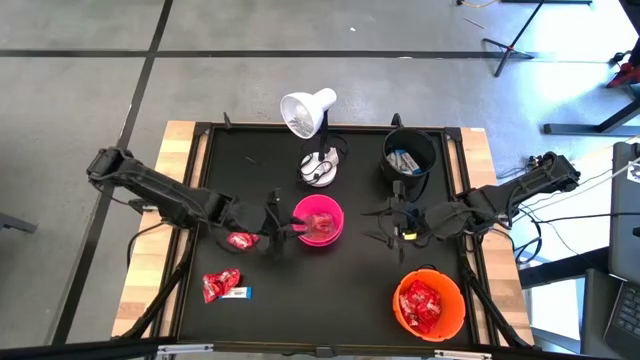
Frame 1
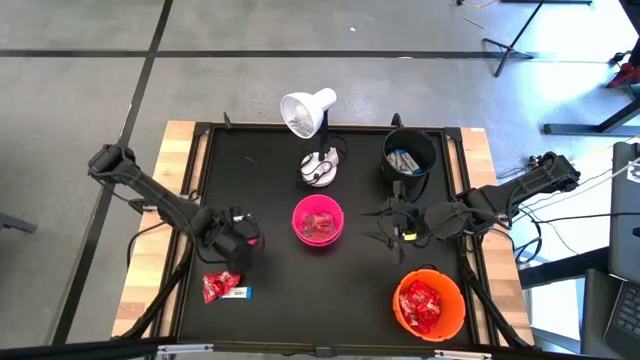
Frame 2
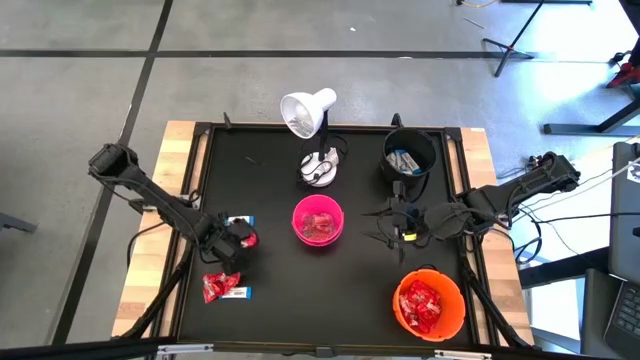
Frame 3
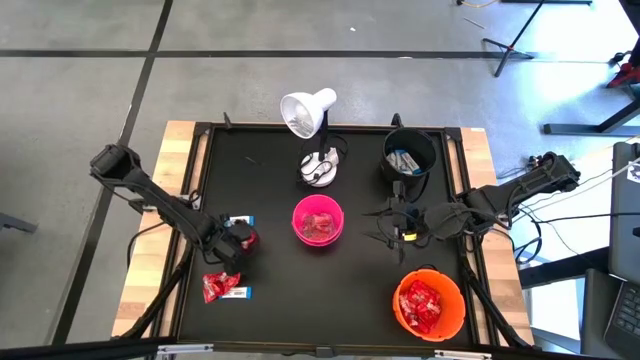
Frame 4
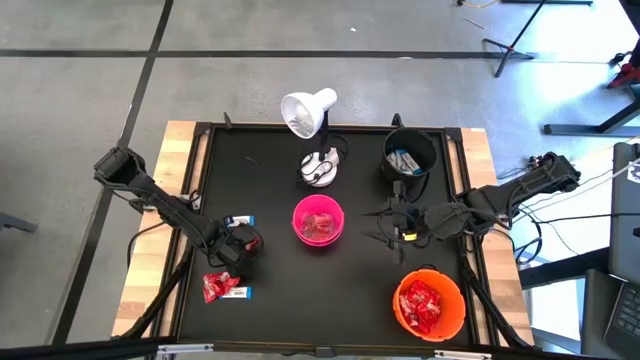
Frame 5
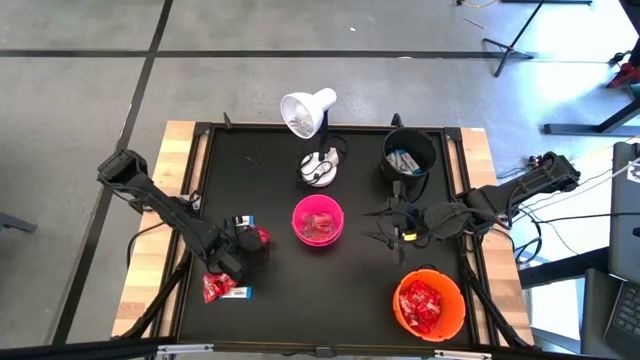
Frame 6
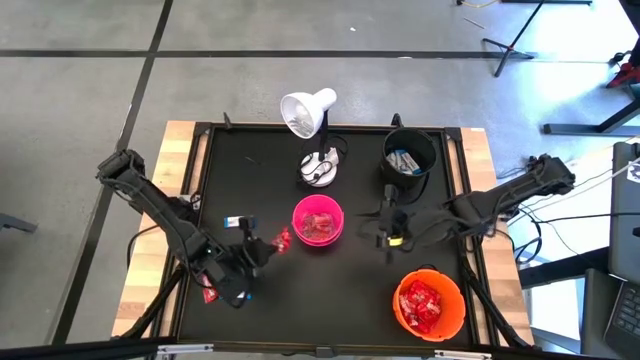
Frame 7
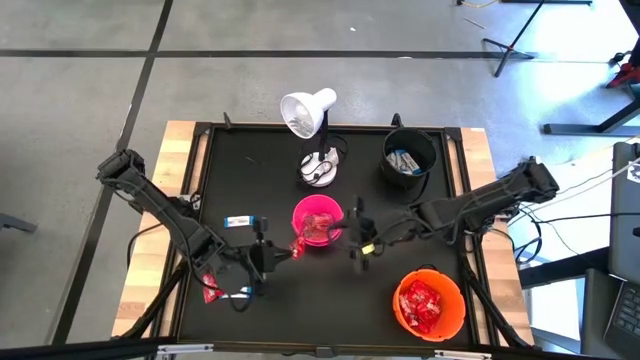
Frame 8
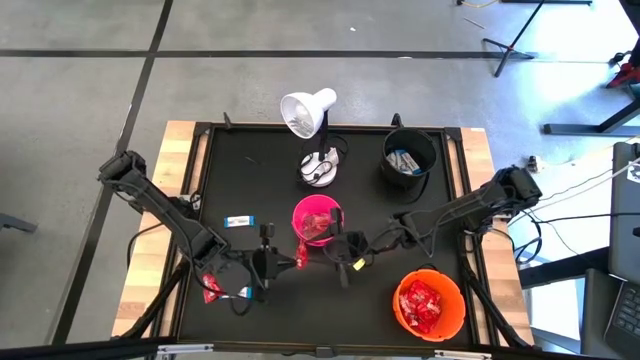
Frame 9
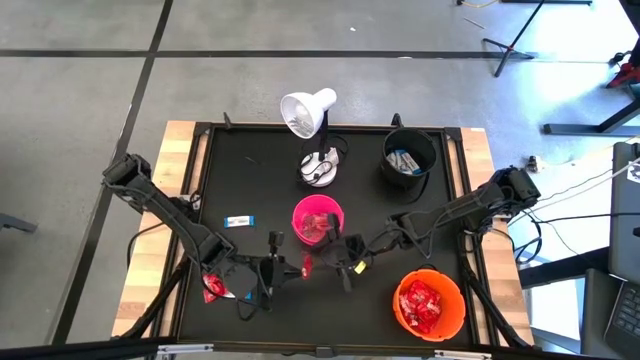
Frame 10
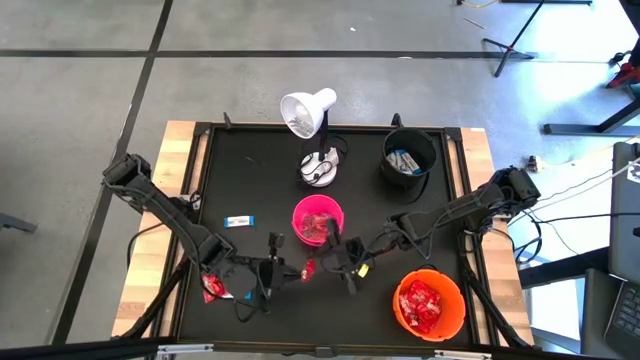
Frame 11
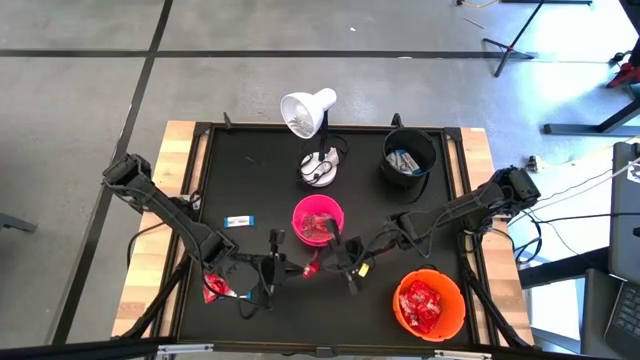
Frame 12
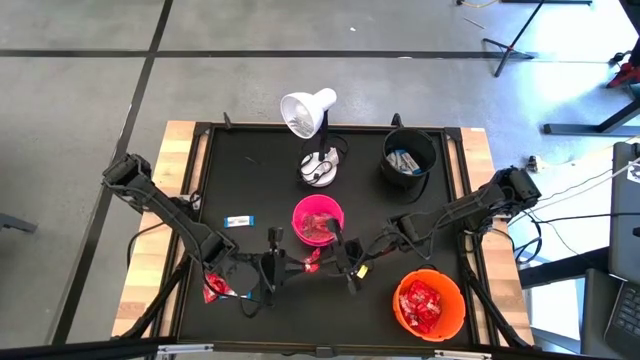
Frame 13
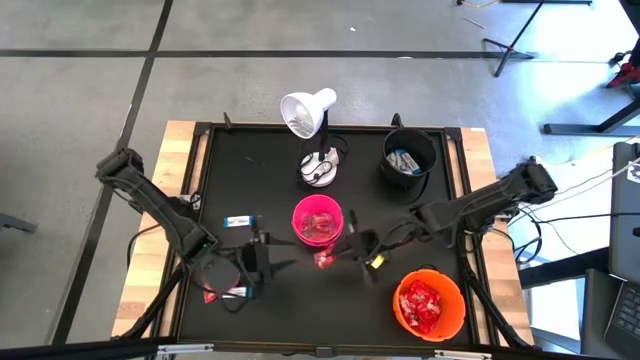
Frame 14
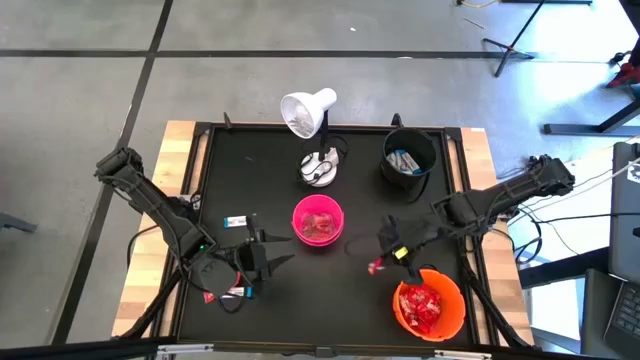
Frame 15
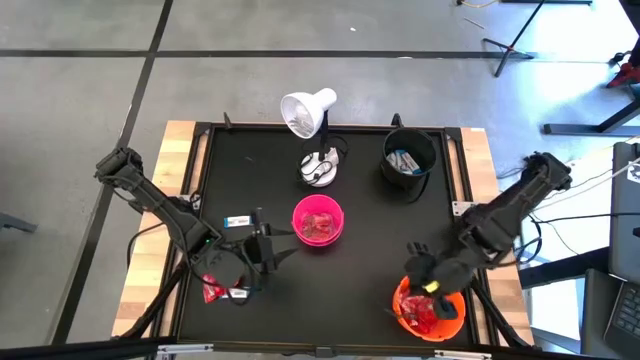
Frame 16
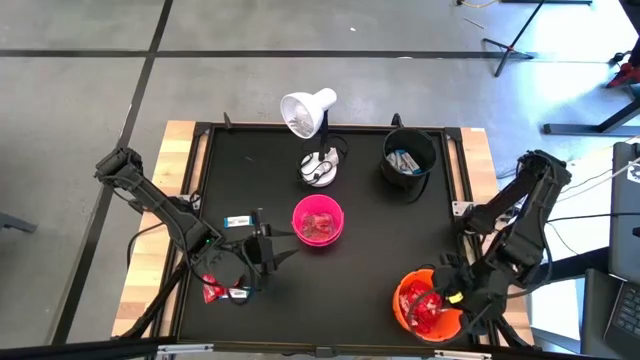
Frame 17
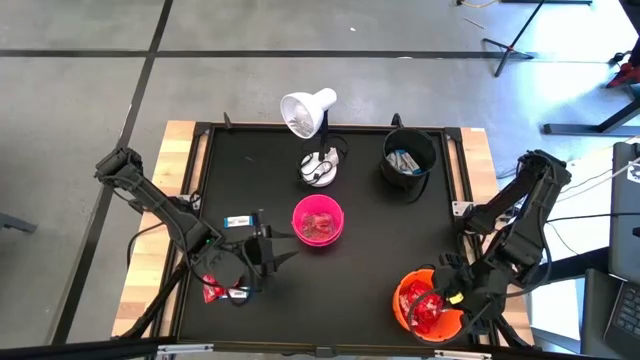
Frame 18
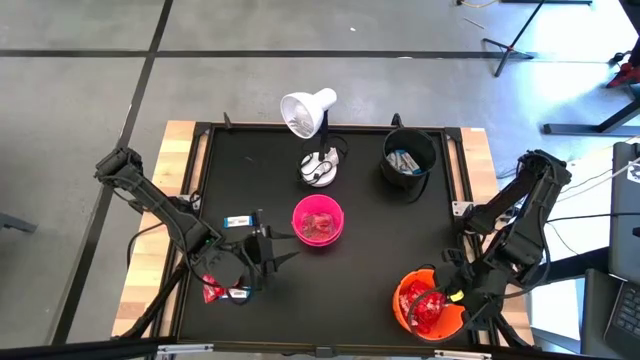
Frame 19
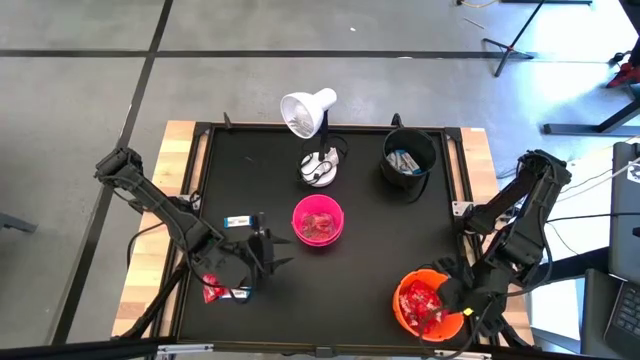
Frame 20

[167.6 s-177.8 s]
Task: Sort candy
Put the red candy into the orange bucket

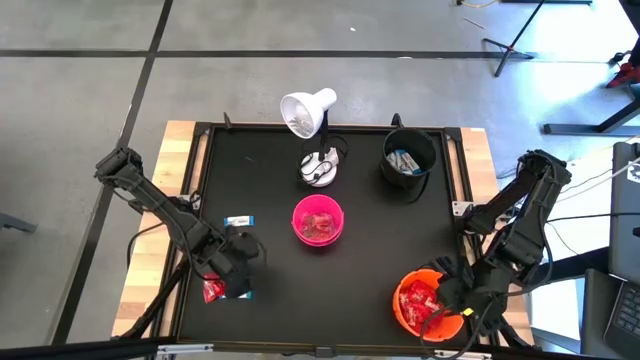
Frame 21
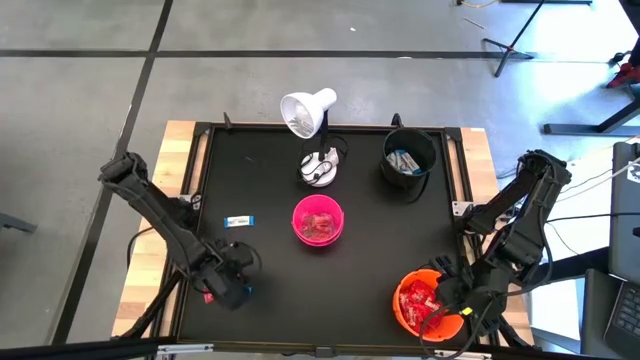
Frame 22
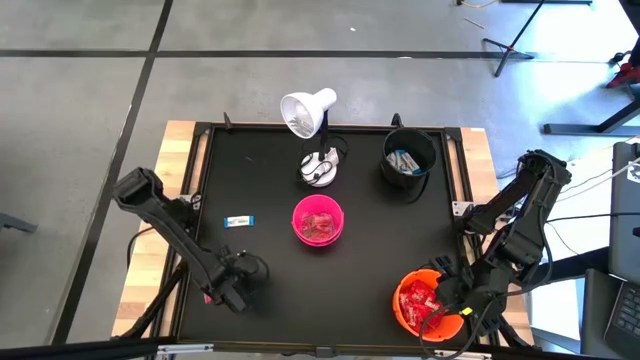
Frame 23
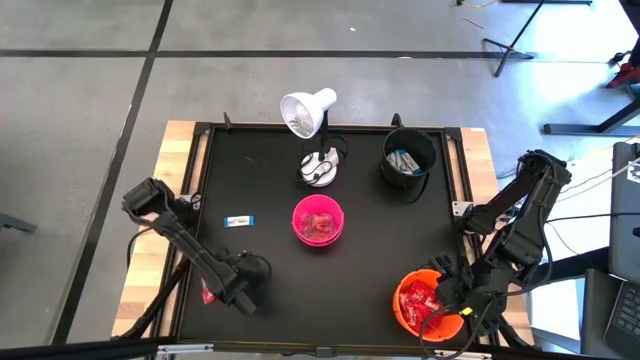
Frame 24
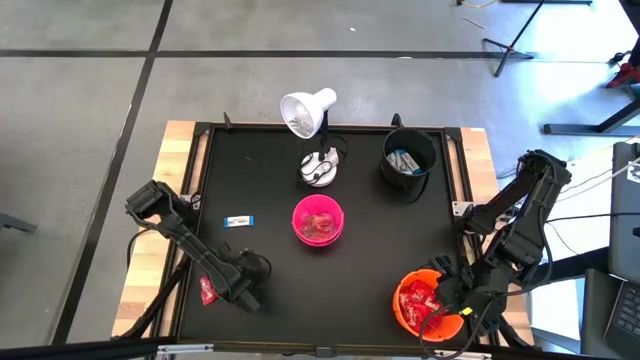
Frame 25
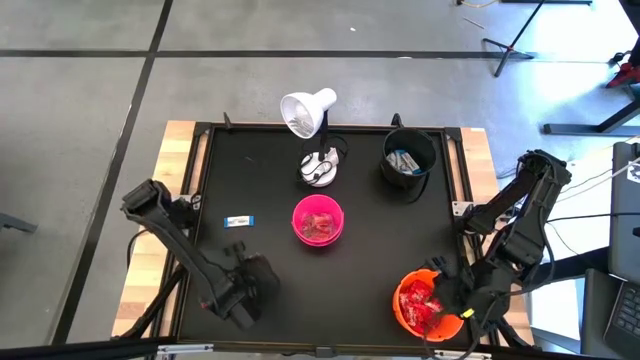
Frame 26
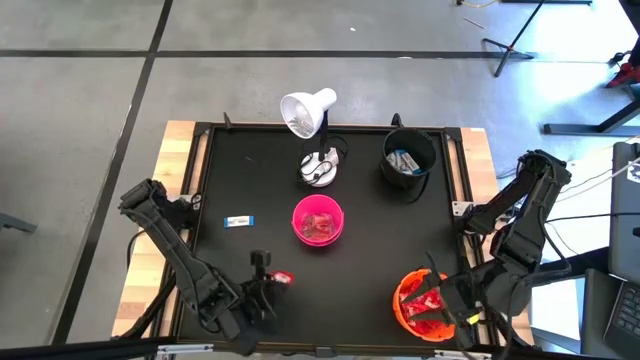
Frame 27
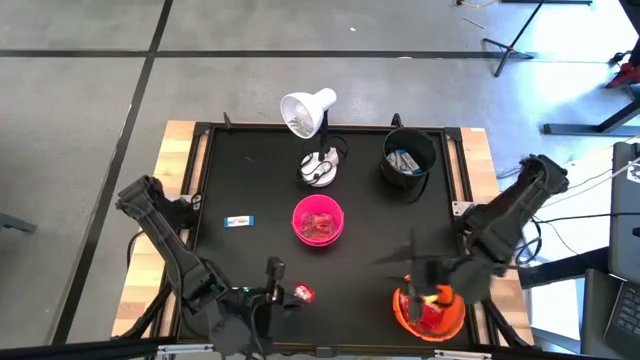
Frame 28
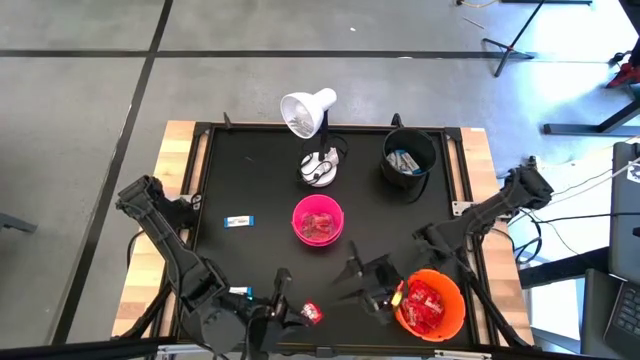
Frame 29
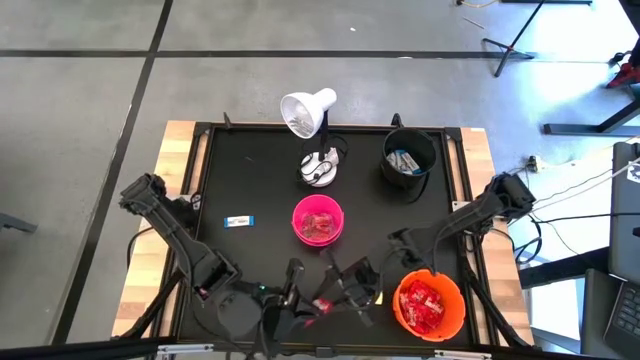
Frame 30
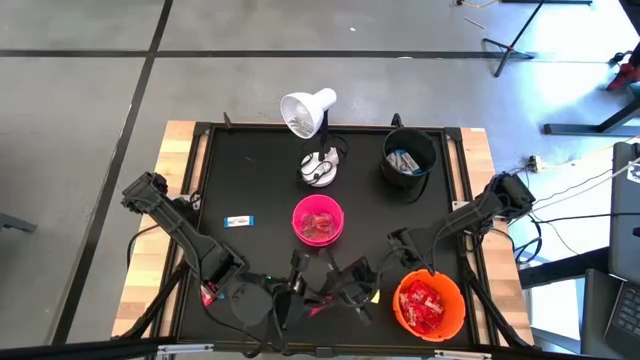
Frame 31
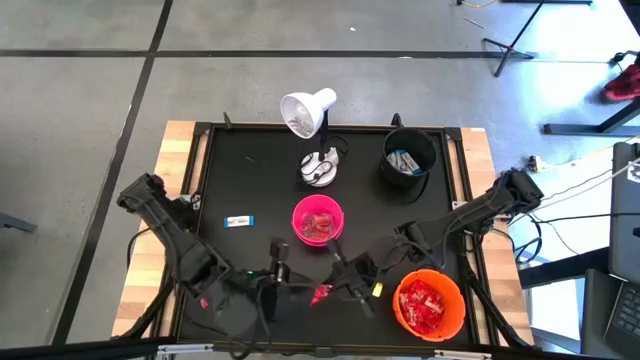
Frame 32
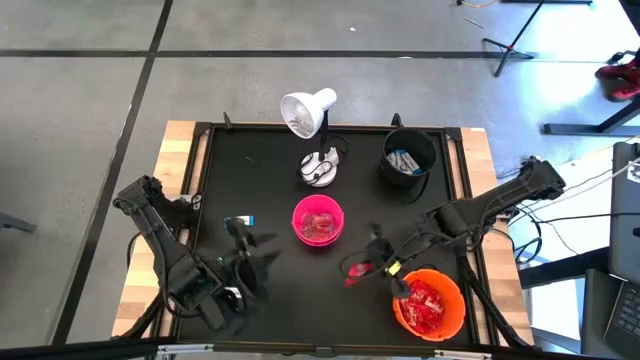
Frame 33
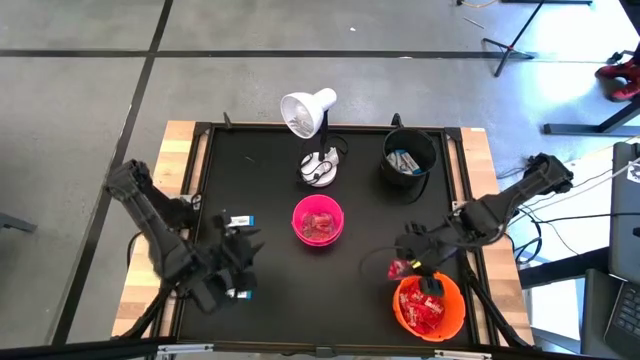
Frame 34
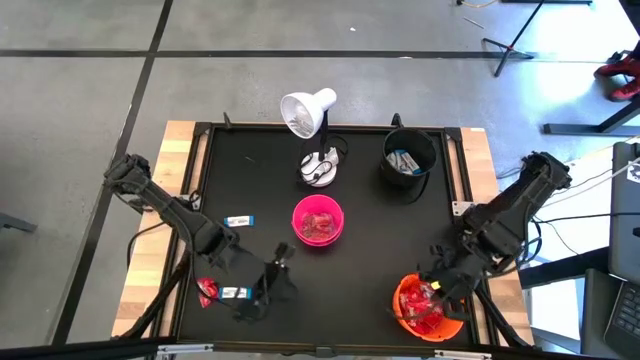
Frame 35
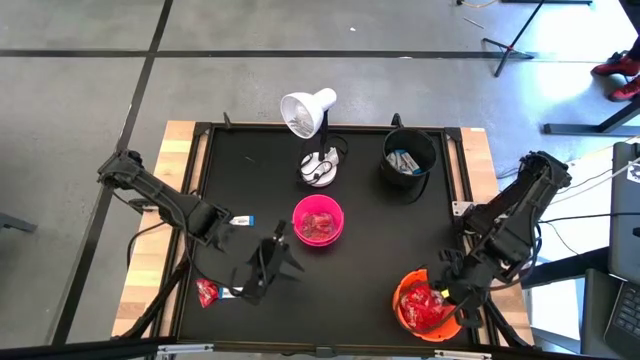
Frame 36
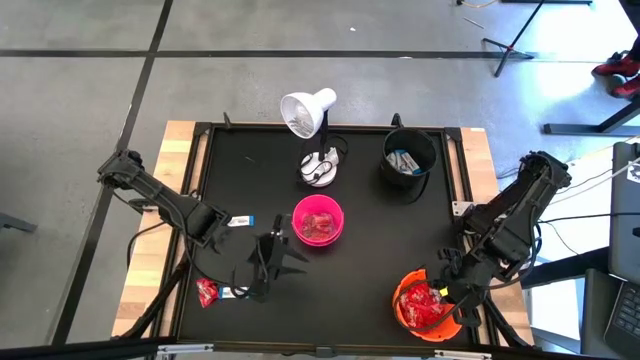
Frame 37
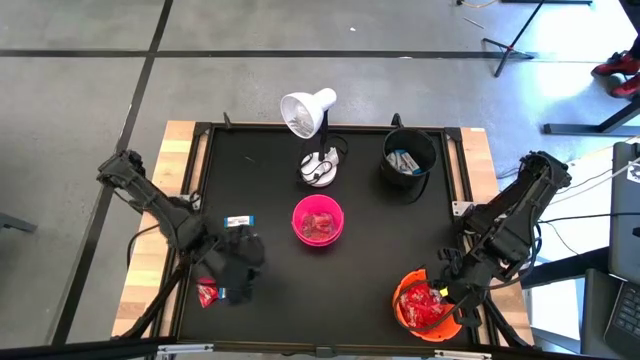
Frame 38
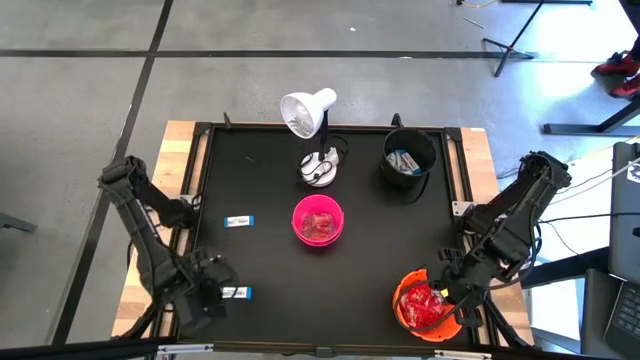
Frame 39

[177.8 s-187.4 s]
Put the red candy into the orange bucket

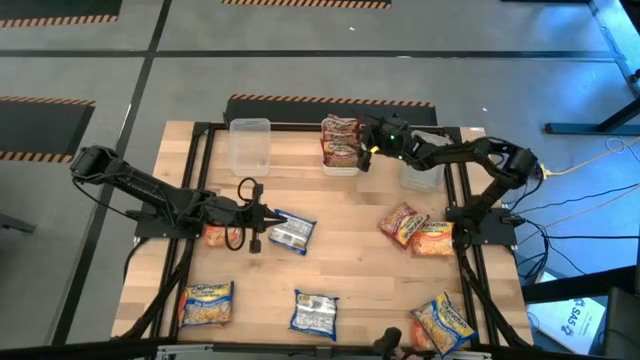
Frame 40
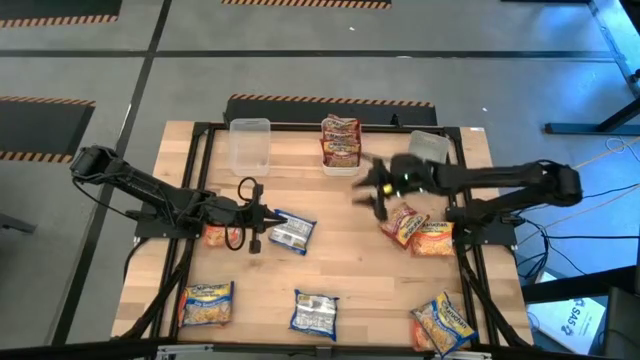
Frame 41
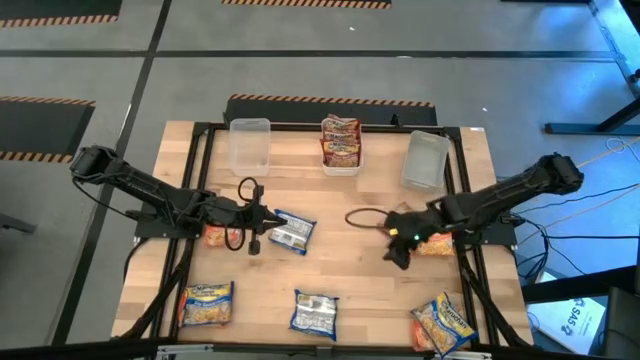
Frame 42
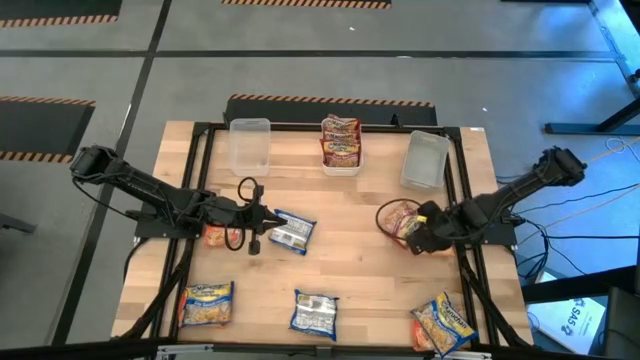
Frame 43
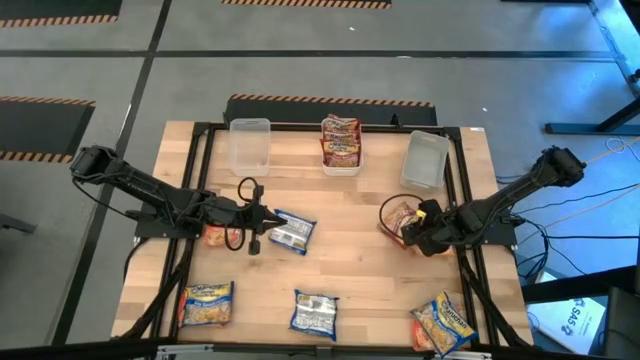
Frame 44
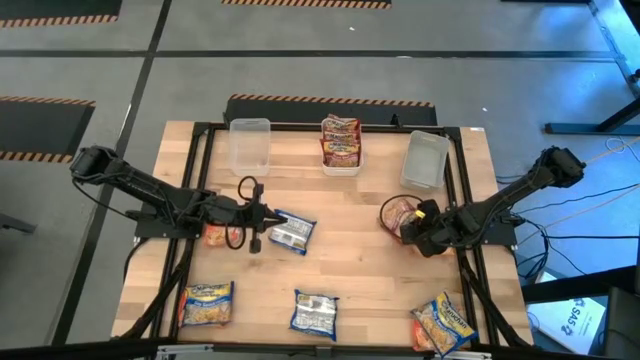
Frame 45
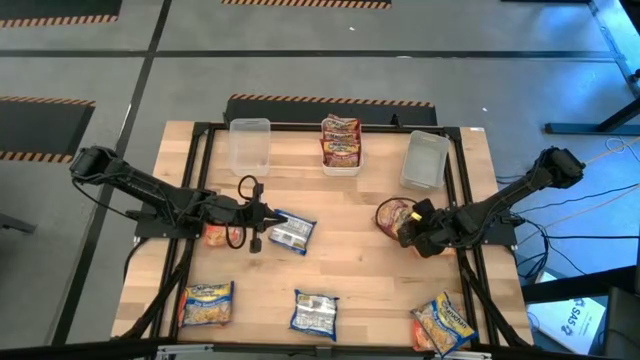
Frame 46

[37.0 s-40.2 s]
Task: Sort Maruchan noodles
Put the red noodle pack into the white bin
